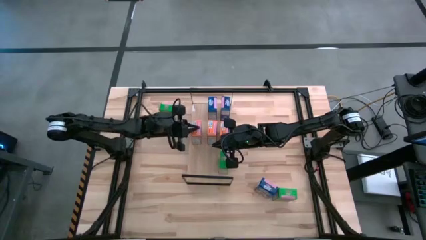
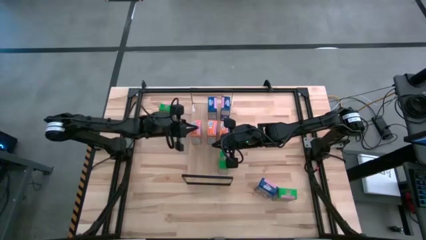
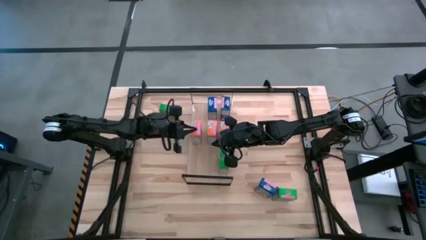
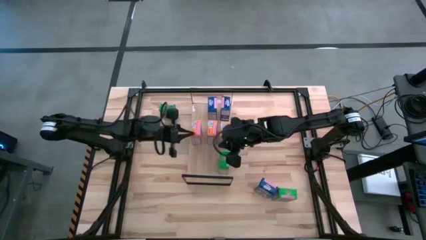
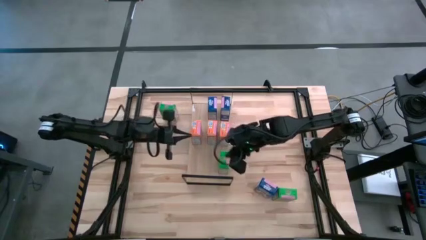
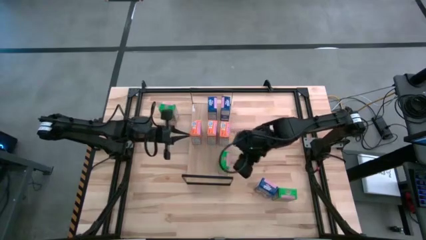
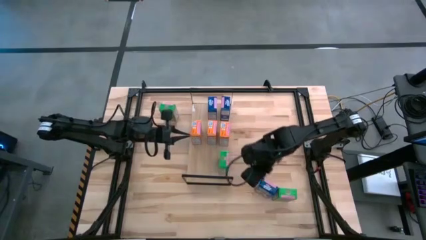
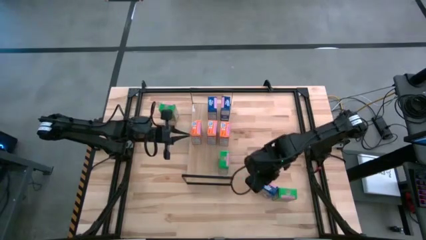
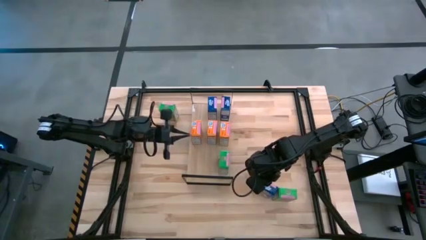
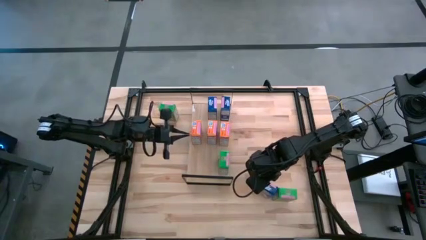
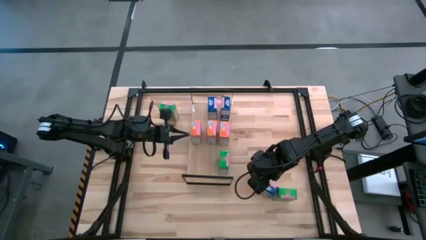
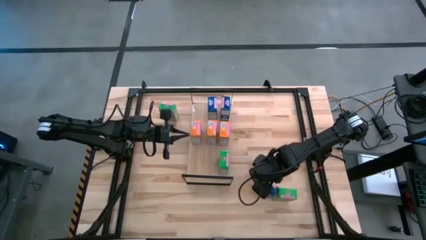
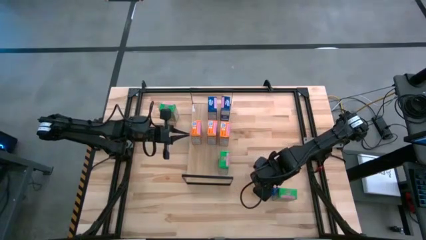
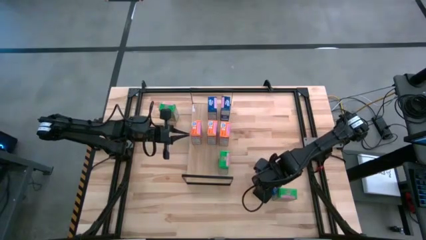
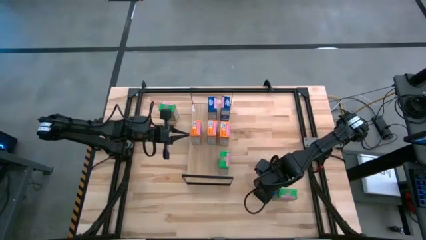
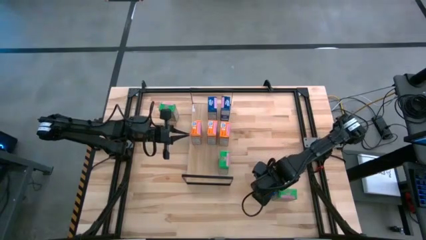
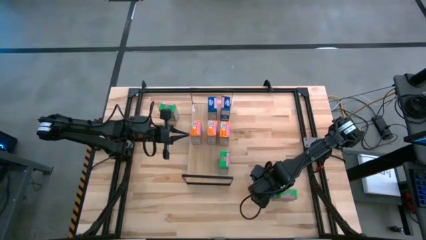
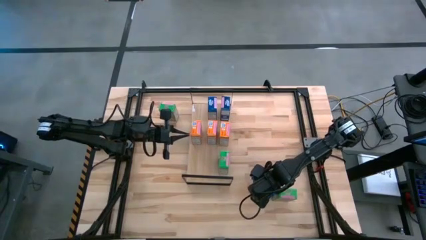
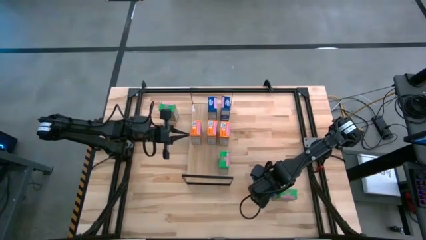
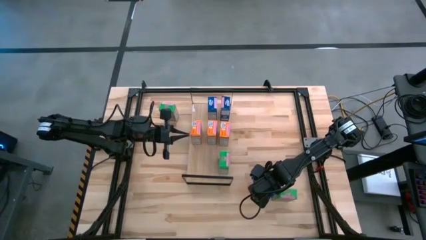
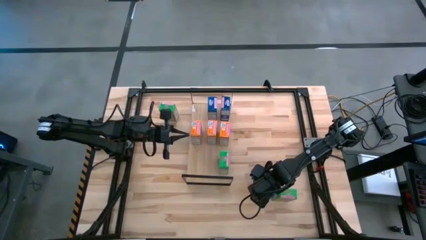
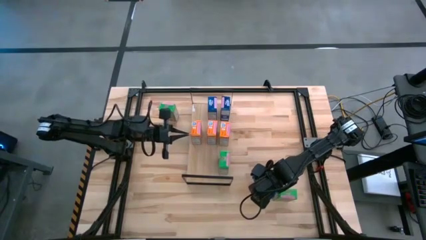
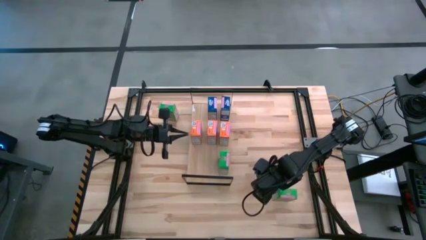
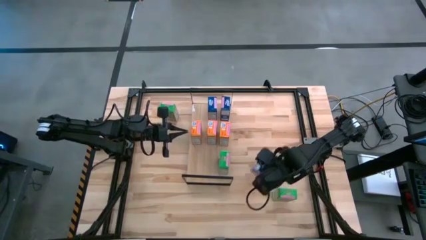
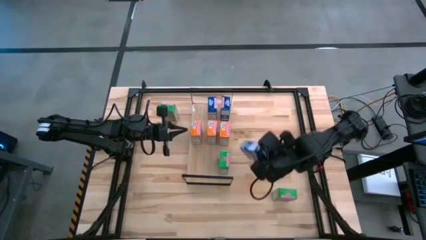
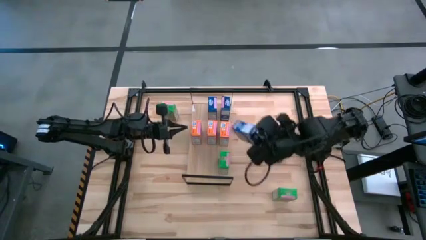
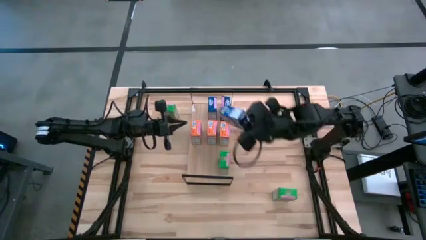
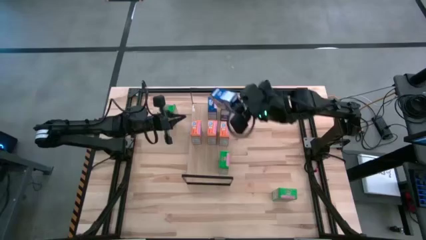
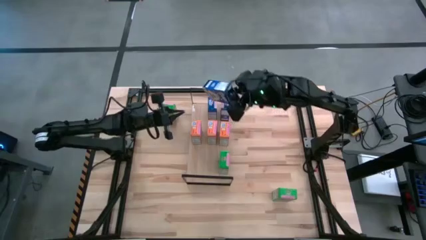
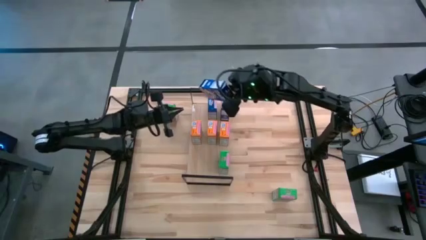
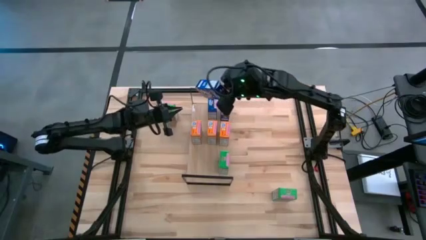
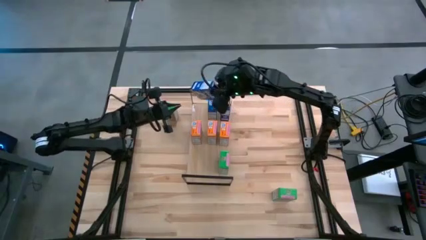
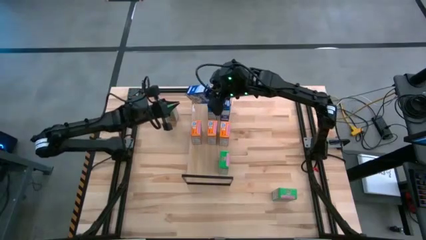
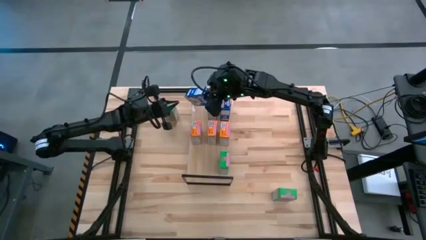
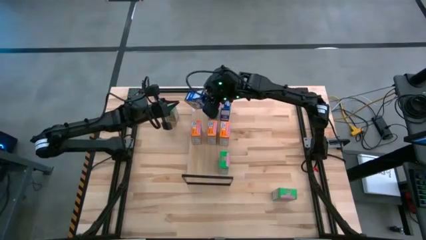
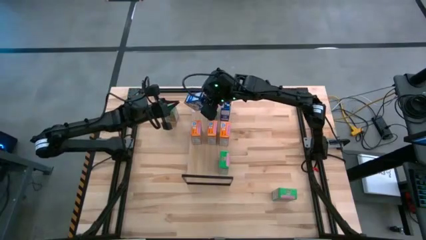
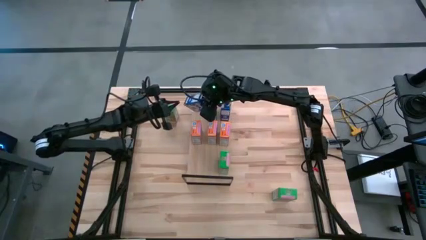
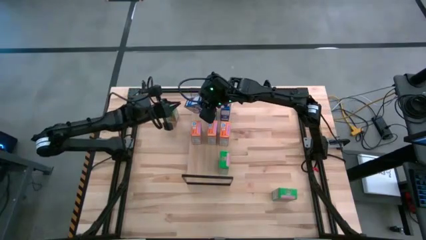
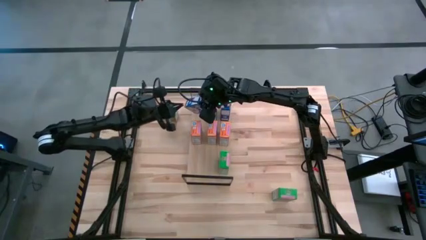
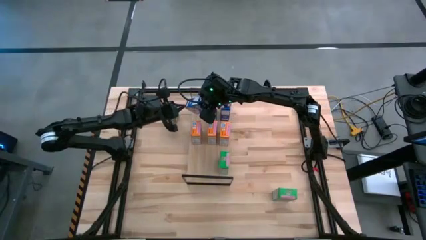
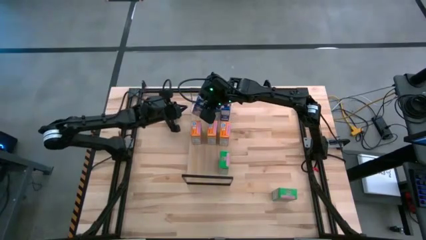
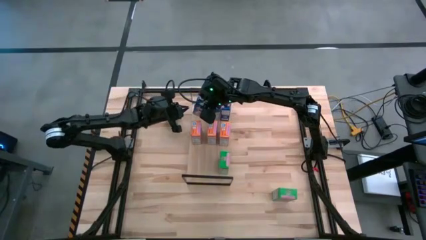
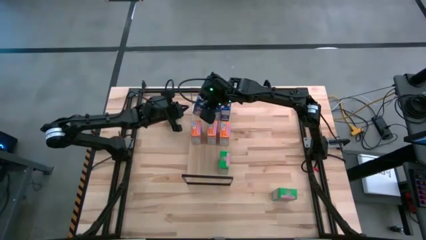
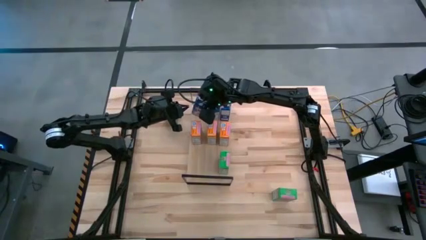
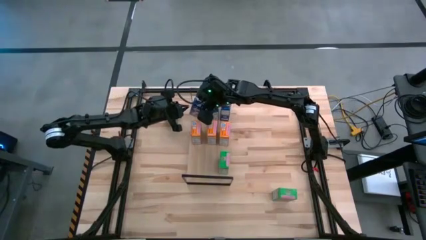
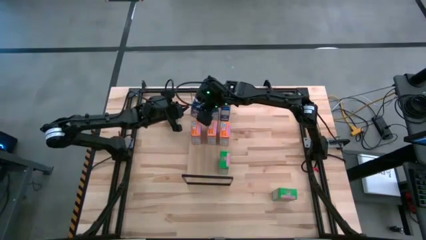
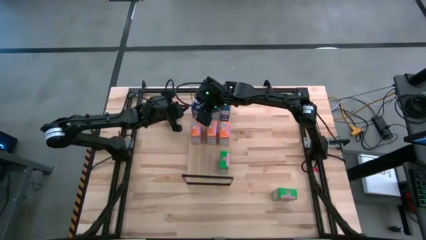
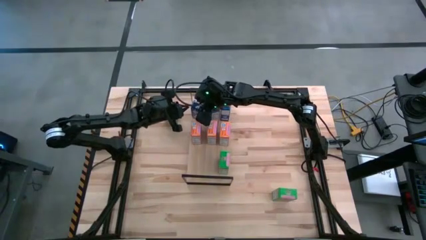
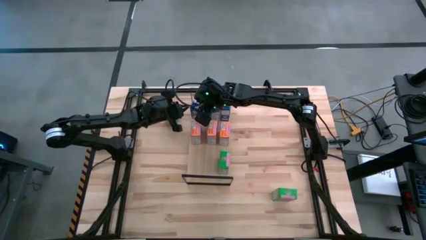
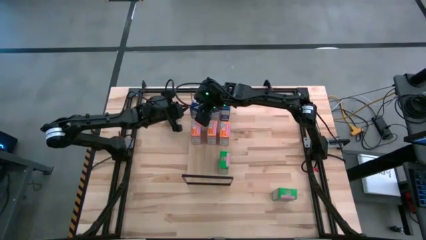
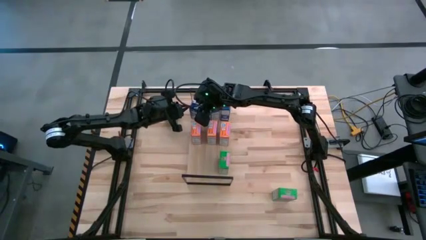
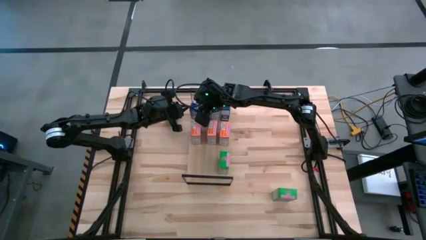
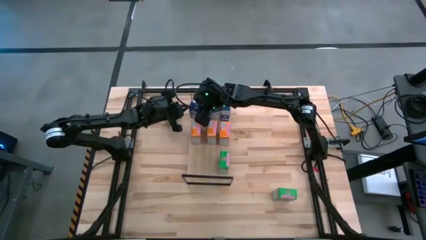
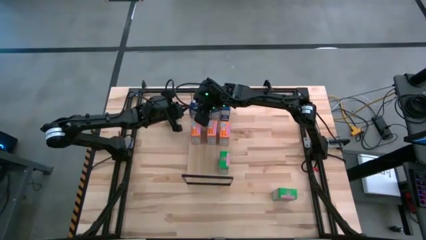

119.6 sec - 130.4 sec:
Task: Stack cereal on shelf
Put the blue cereal box on the shelf aligned with the other blue cereal boxes

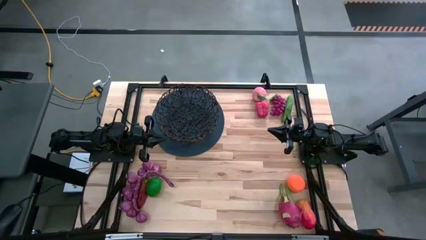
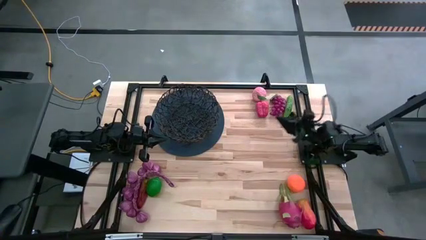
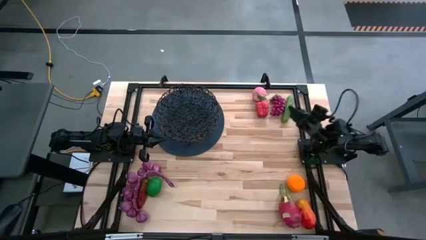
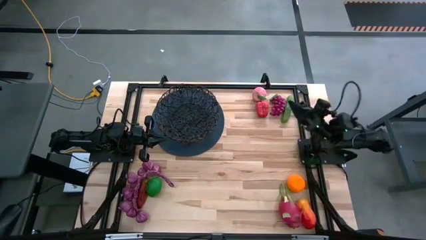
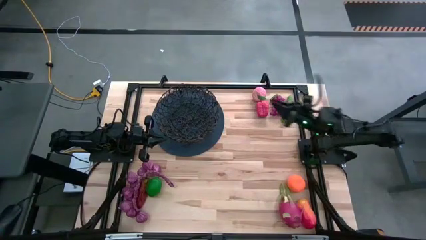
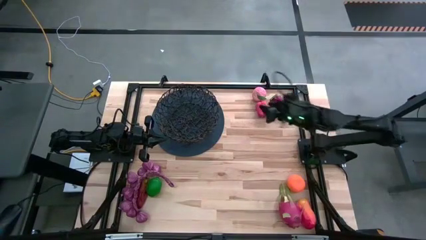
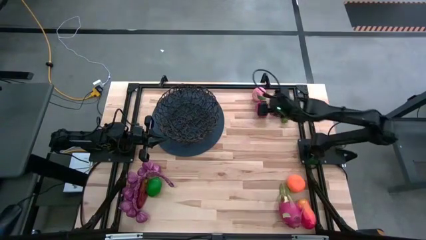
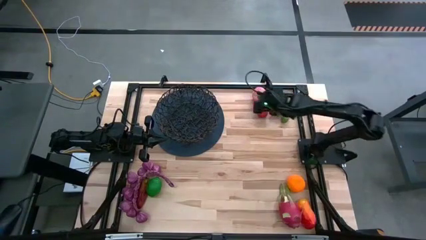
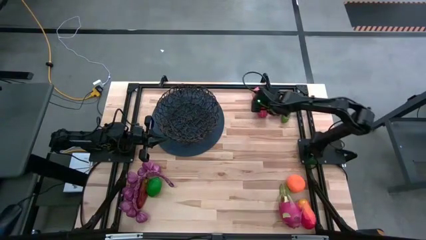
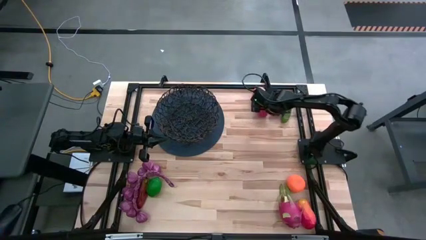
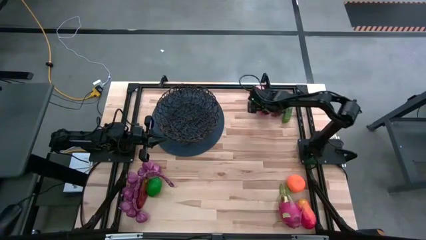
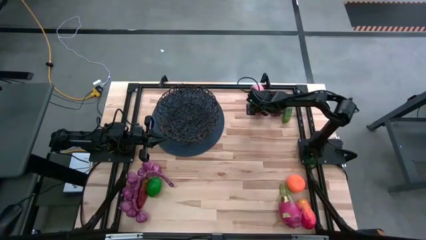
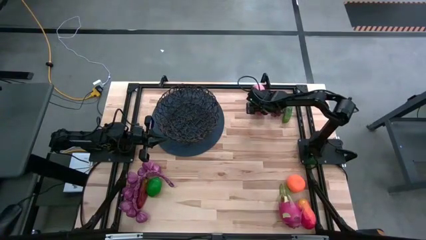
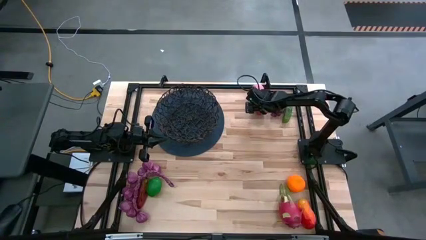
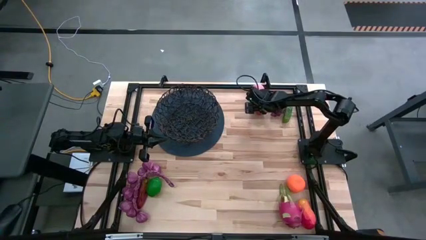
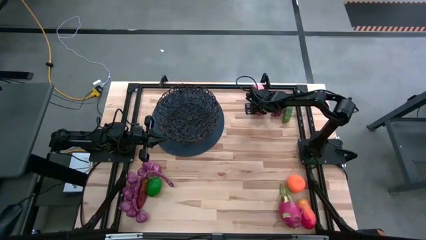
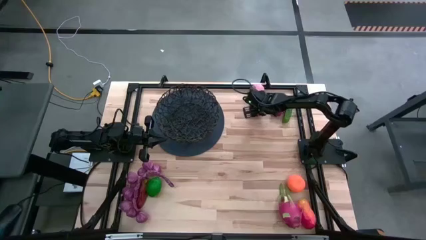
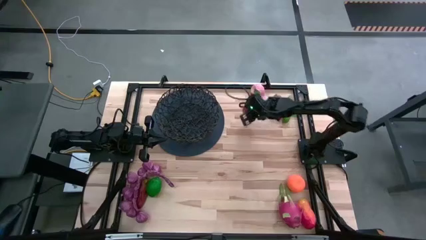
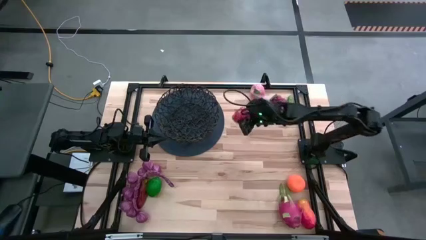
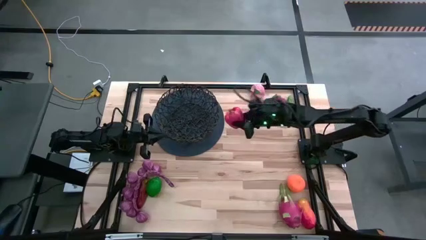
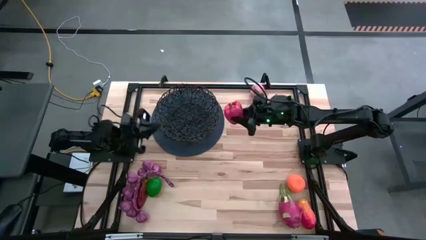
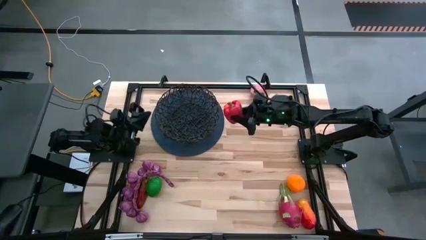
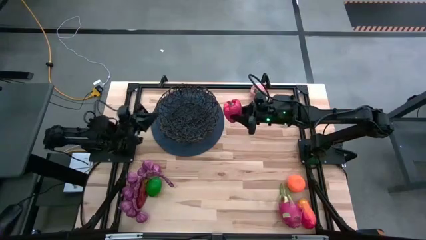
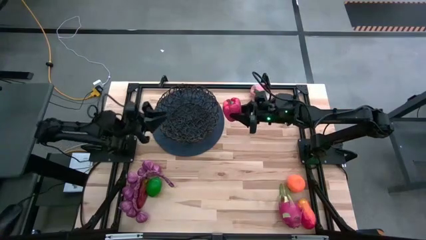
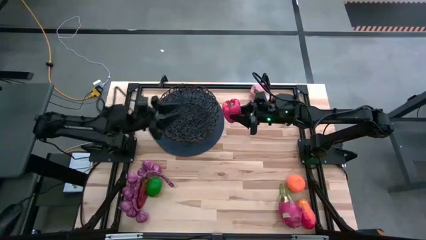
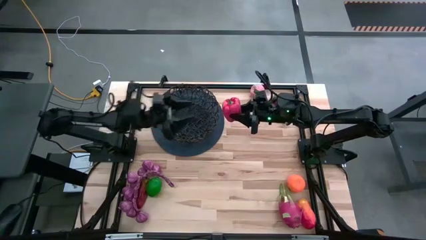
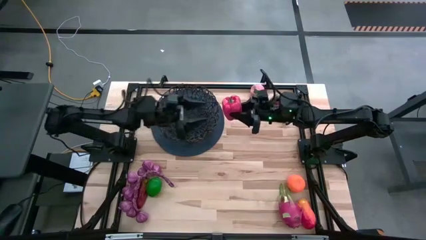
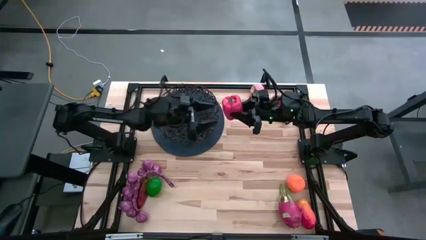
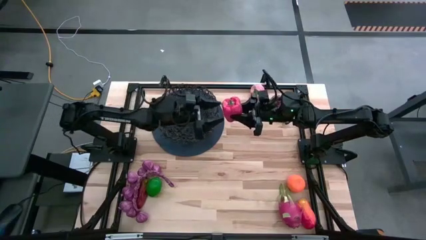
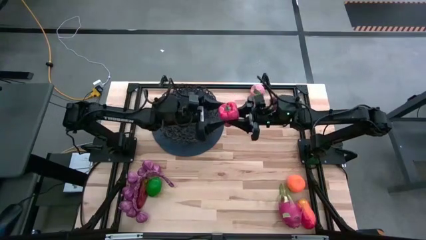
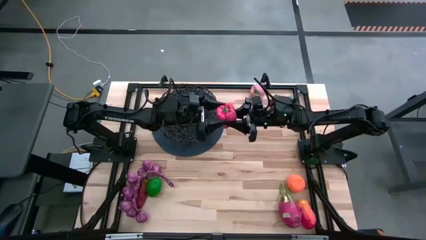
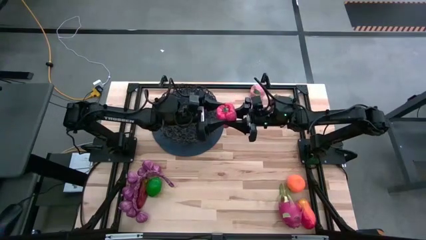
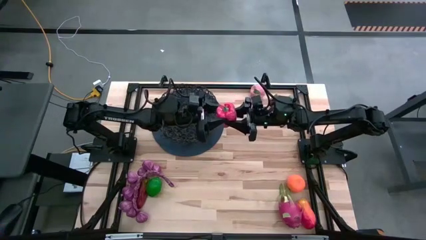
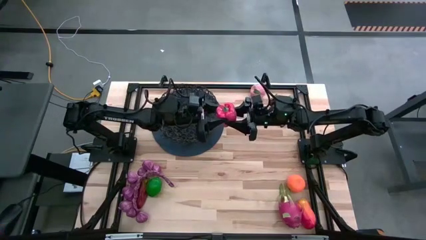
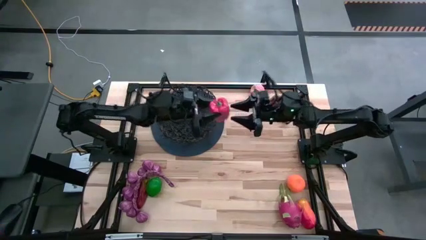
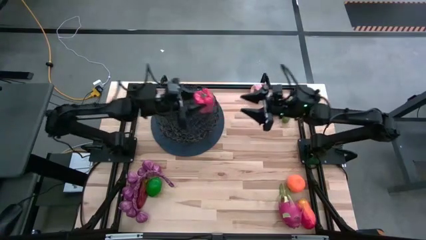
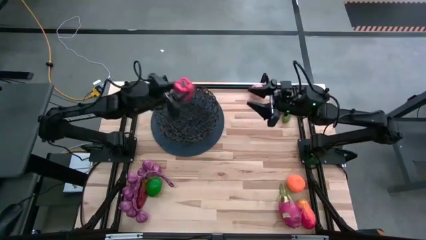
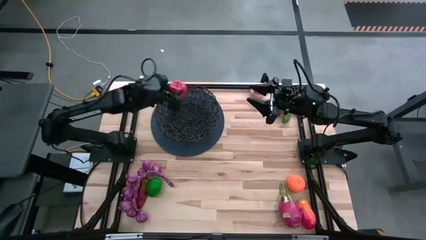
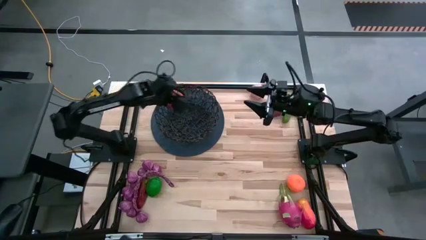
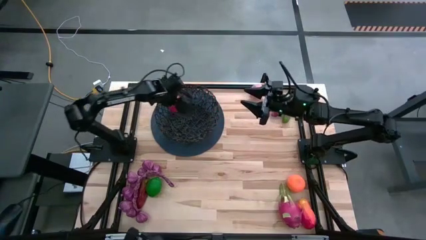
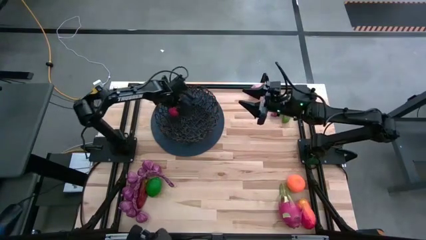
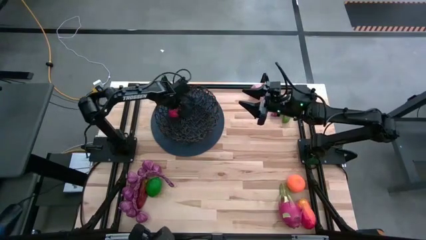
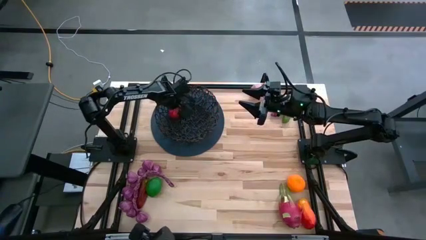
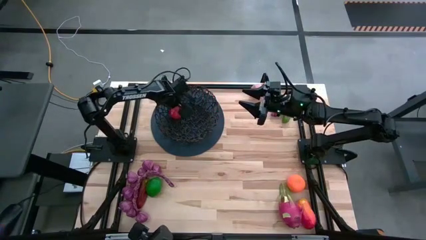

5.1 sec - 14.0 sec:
Task: Build produce basket
Put the red bell pepper into the black wire basket
